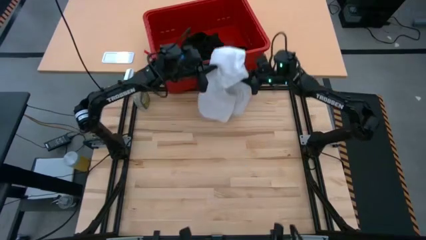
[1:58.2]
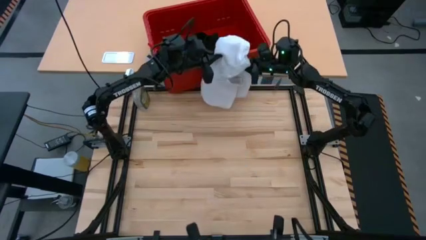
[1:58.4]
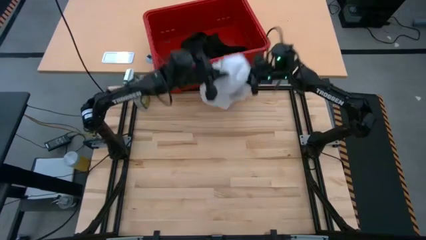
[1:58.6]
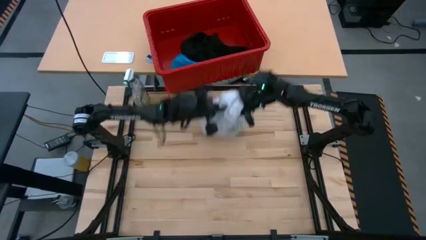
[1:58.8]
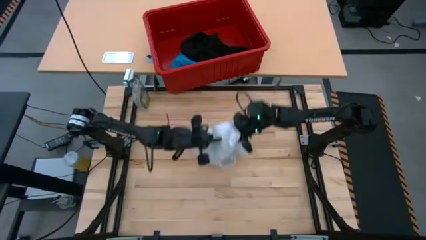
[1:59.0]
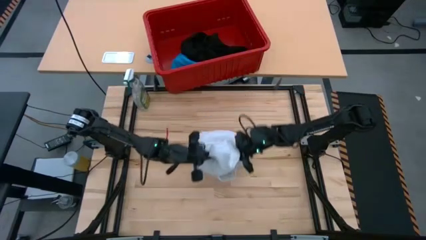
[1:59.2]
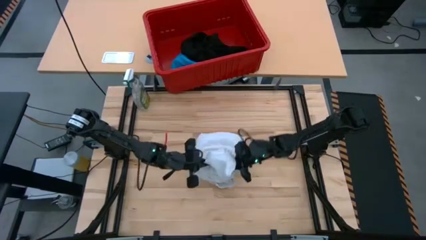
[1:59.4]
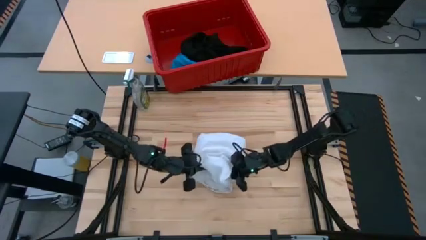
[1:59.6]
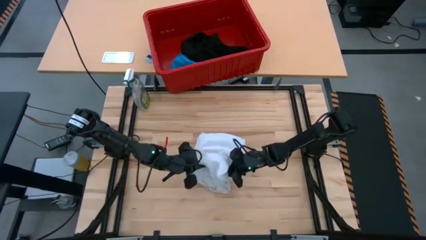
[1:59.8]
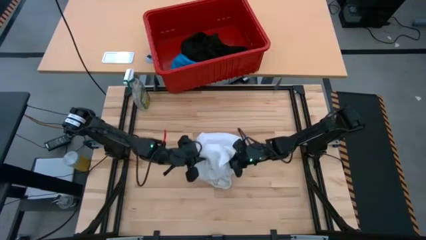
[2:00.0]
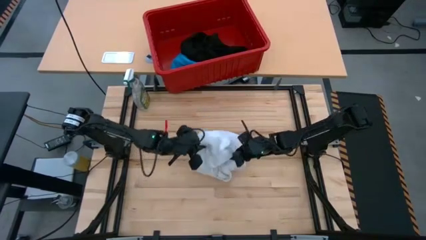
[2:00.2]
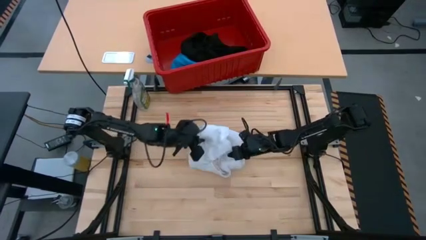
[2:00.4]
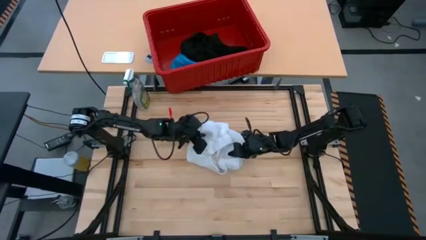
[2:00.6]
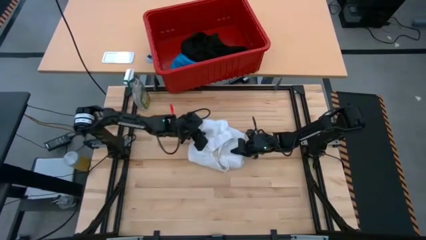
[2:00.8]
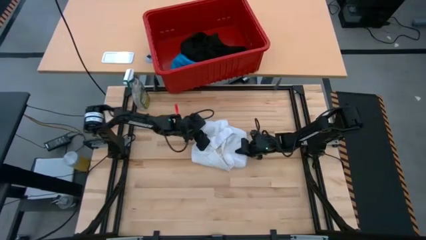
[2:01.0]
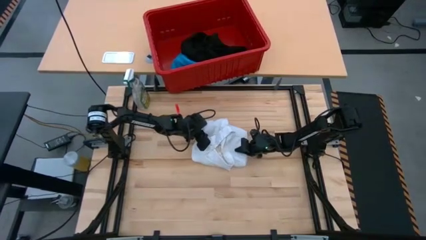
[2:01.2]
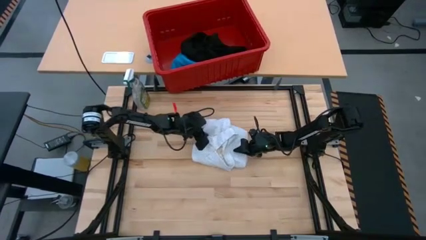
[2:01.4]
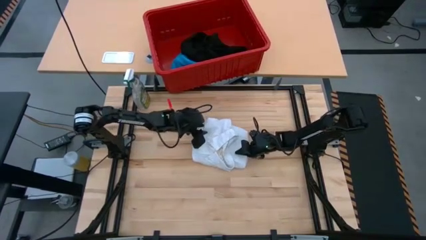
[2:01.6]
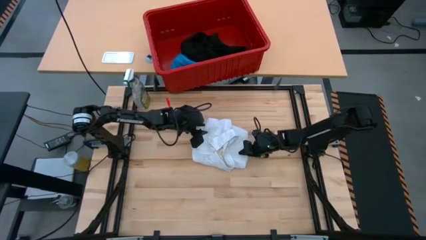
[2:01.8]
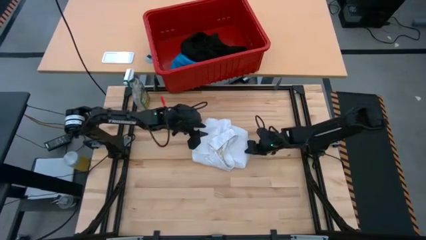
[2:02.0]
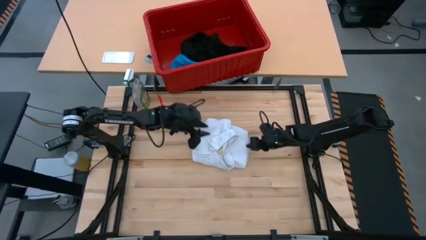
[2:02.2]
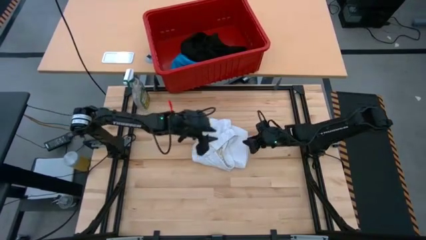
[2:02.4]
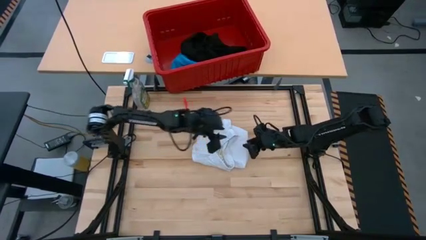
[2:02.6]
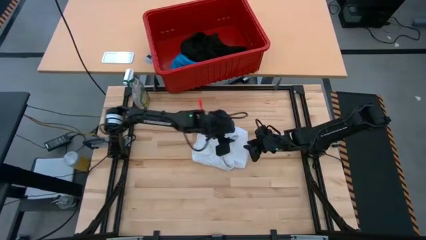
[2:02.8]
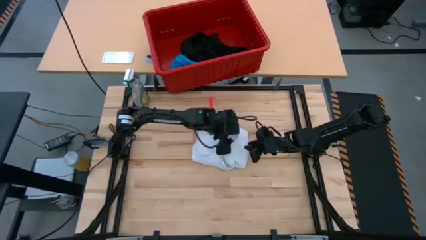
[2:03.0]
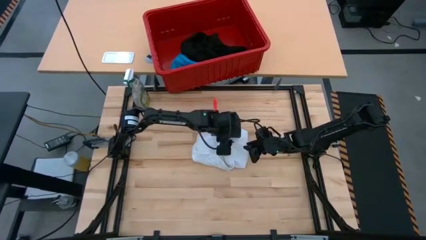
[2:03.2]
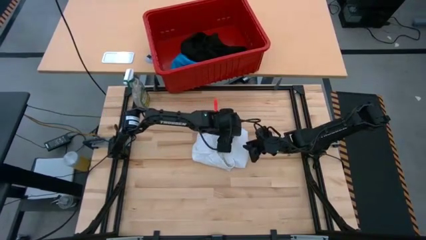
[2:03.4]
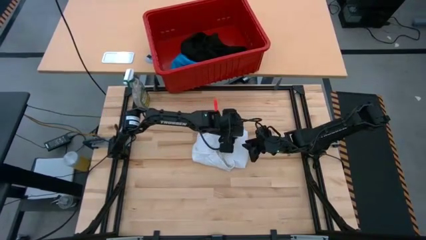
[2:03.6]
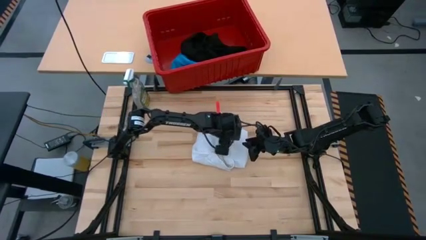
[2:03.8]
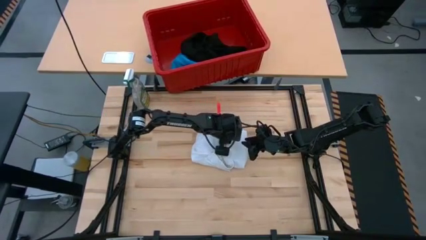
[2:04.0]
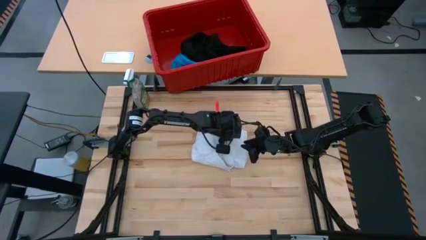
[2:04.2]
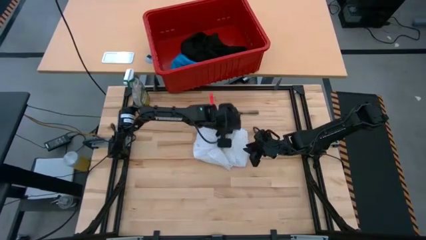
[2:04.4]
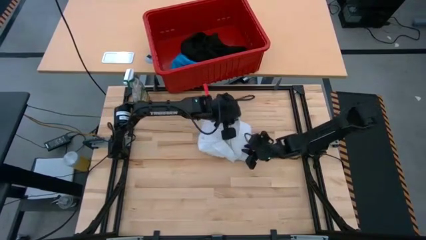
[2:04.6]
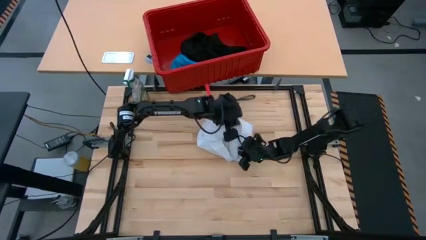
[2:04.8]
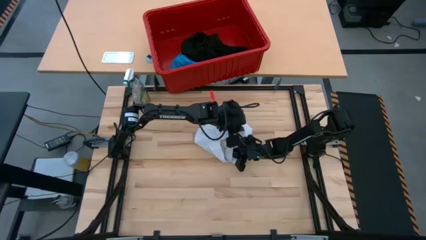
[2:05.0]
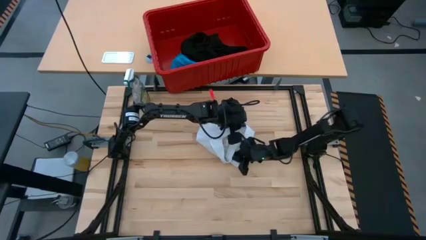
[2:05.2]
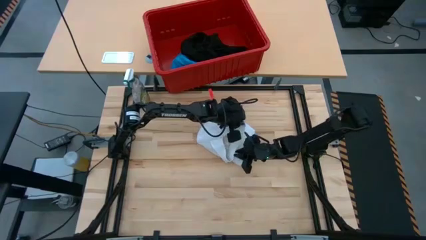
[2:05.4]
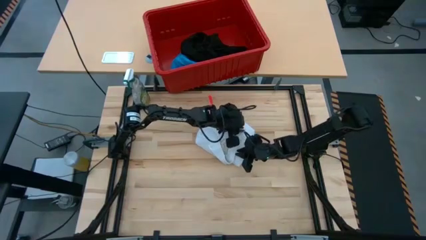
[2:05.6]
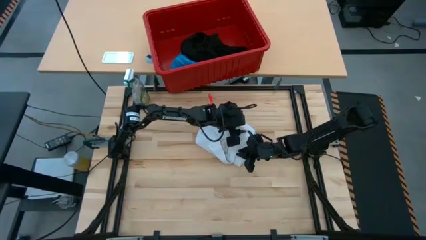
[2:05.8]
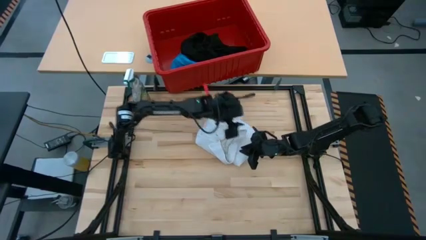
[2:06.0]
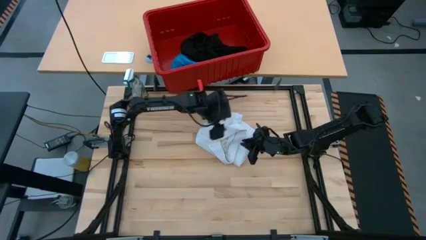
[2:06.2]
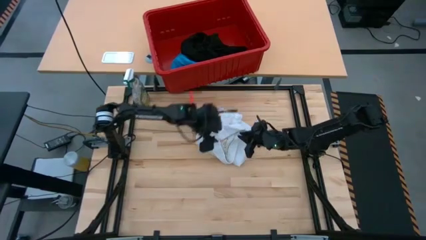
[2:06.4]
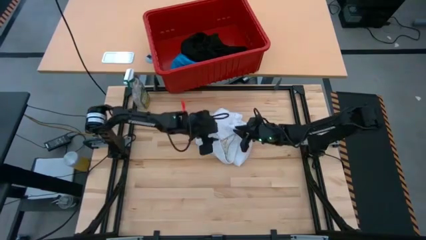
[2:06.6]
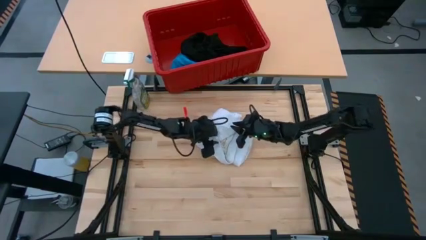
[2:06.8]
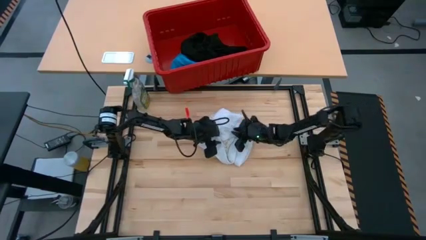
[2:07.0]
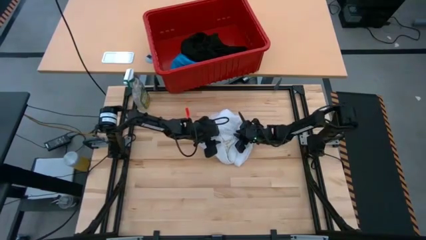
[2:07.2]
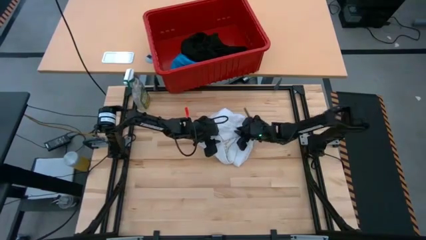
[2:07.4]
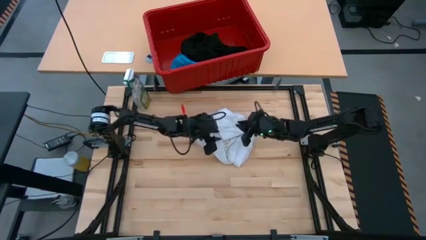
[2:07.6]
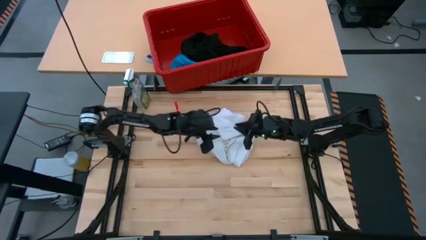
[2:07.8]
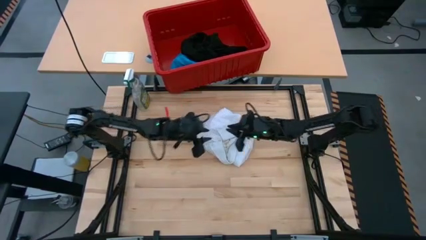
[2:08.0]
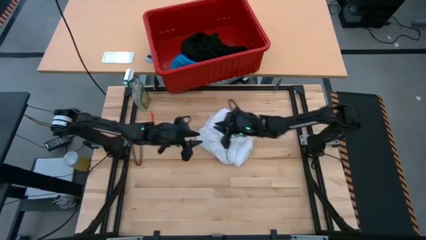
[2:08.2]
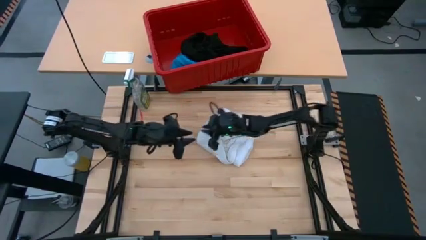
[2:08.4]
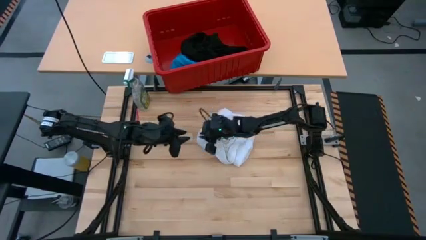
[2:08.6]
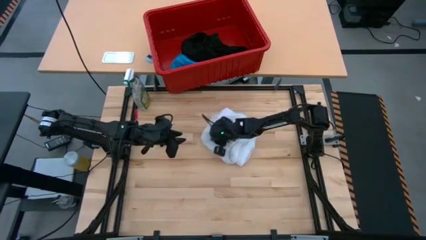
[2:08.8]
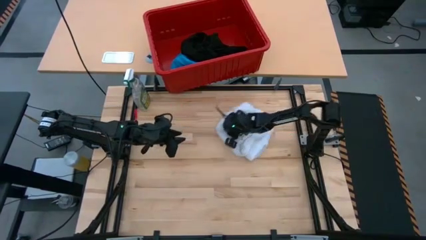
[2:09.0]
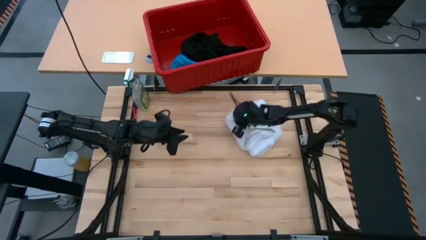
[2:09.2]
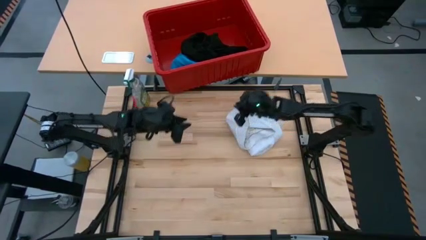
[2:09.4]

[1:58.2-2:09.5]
Task: Fold laundry
Fold the white polo shirt

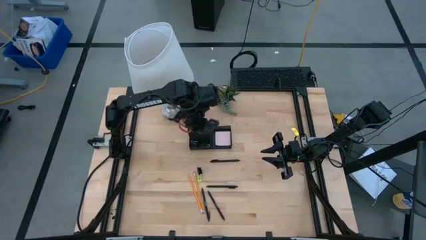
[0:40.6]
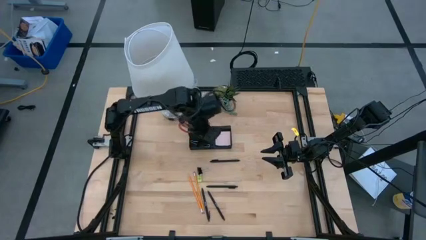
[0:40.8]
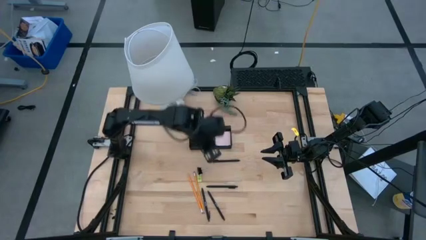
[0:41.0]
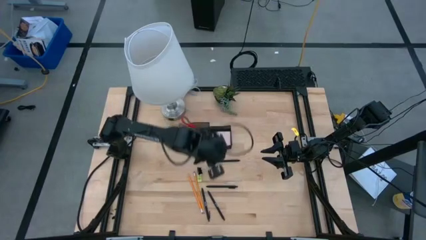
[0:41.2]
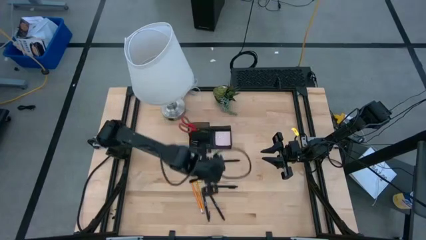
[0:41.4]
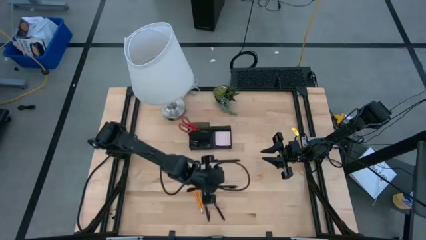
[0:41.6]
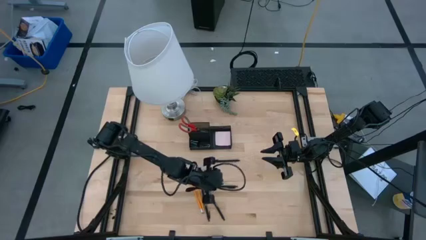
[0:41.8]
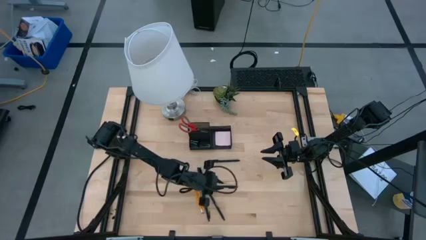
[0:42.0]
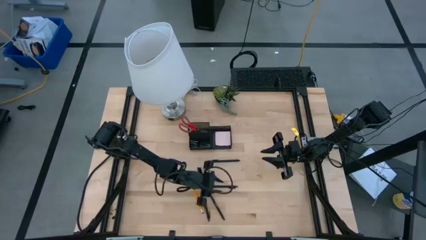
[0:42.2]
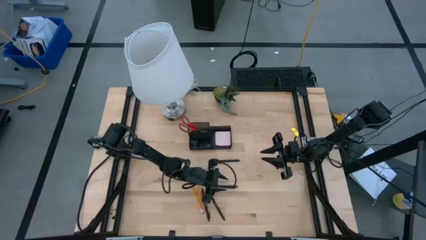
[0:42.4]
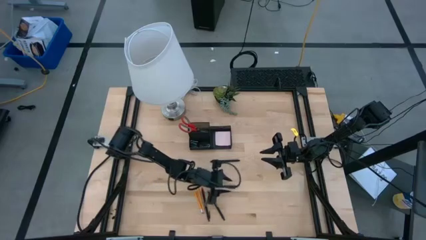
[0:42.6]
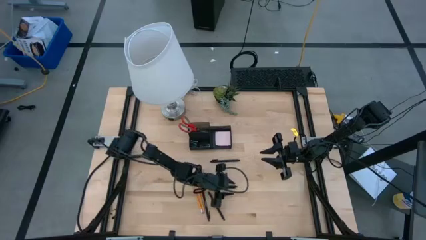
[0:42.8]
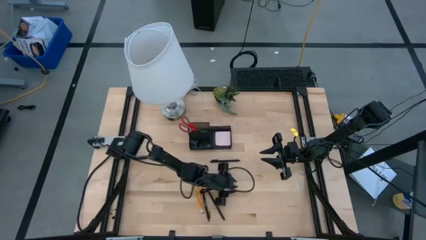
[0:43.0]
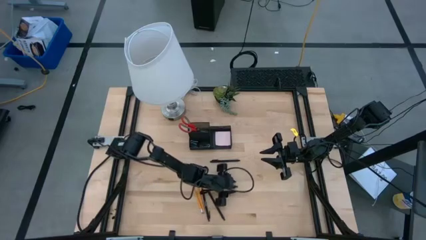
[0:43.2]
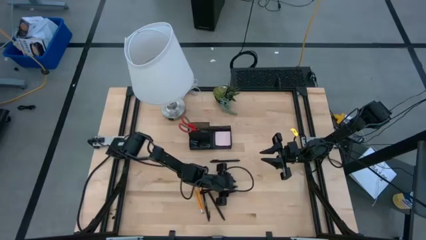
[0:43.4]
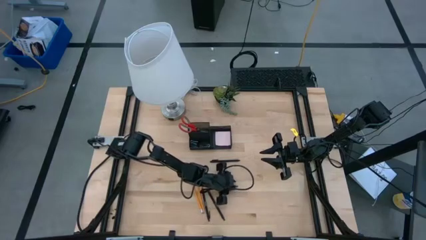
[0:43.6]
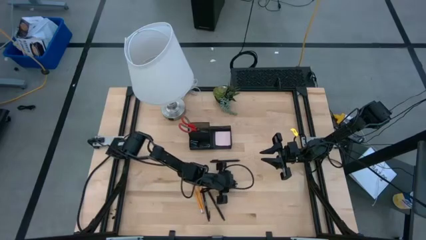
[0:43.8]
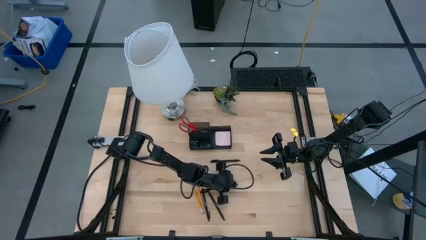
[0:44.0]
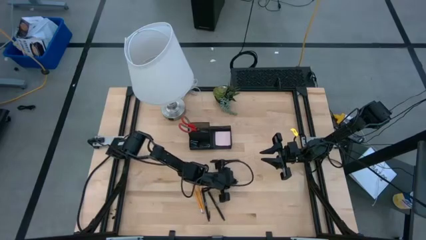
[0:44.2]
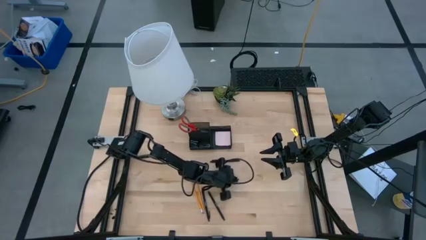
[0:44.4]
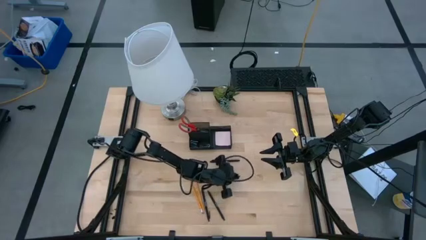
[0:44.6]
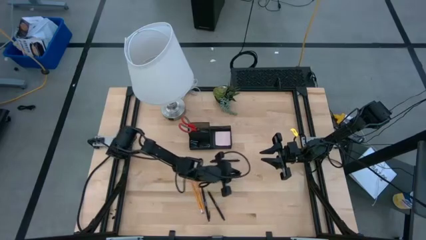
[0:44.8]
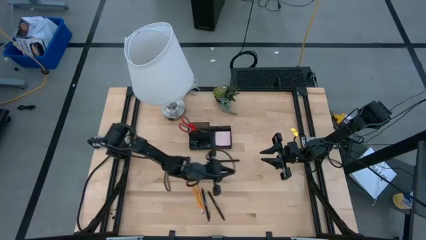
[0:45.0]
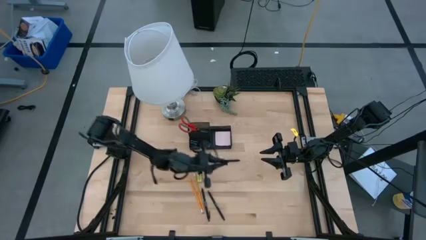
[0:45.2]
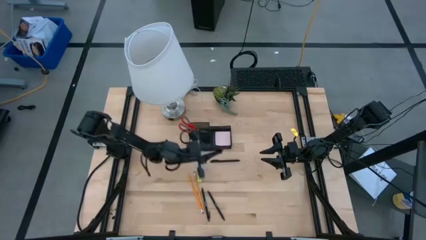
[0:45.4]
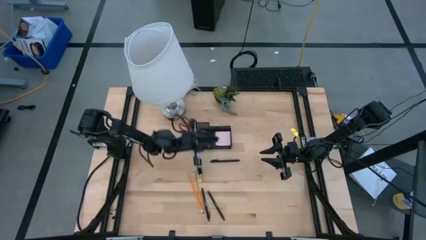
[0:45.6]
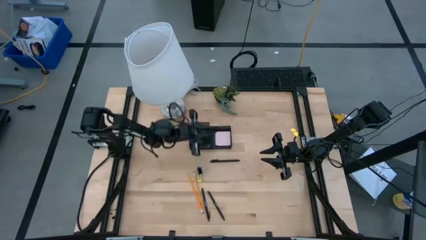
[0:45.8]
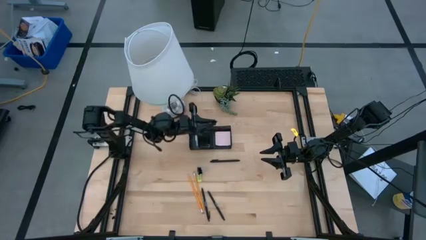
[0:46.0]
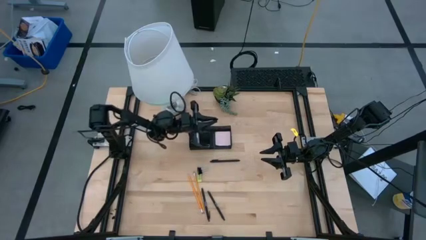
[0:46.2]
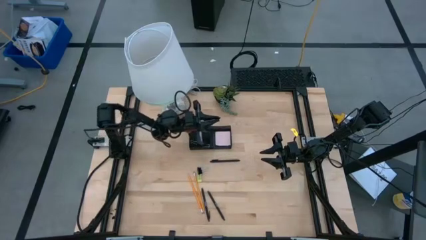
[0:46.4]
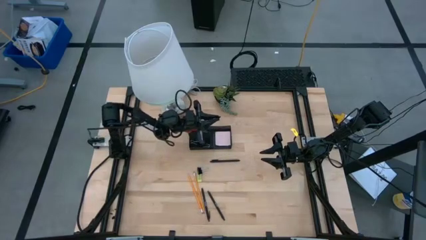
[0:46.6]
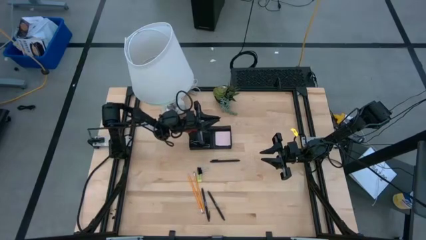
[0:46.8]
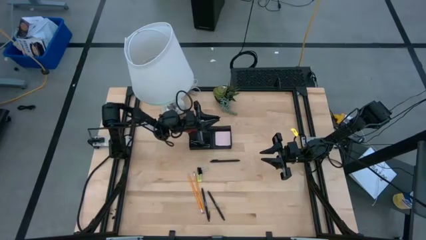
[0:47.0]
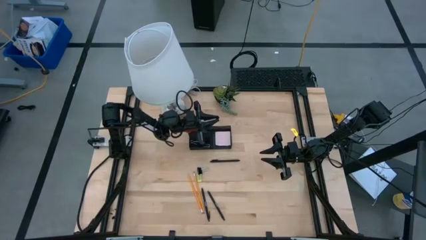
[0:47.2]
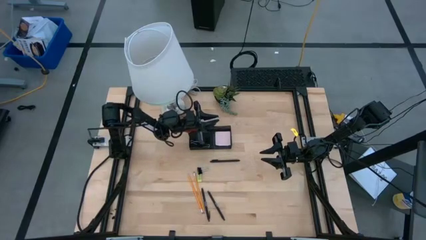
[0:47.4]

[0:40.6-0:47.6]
Task: Pick and place office supplies into organizer
Put the middle black pen into the black desk organizer
